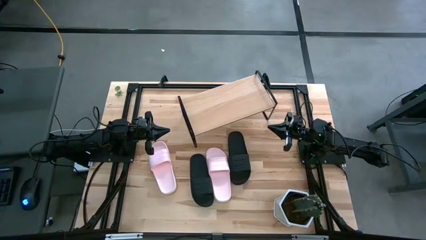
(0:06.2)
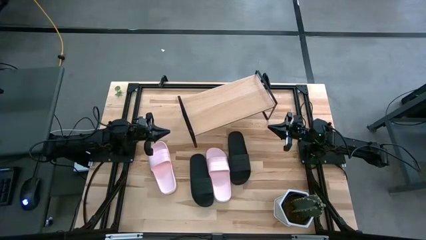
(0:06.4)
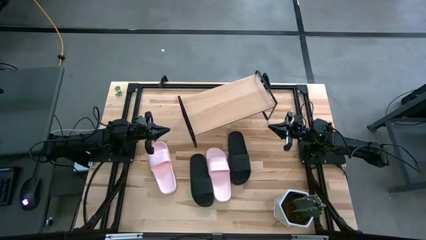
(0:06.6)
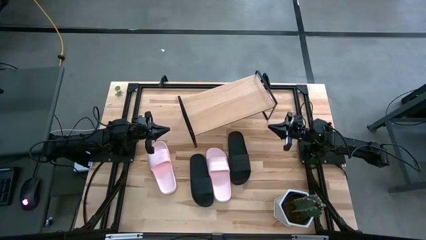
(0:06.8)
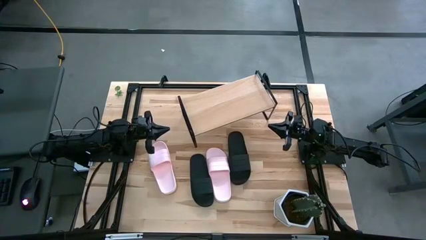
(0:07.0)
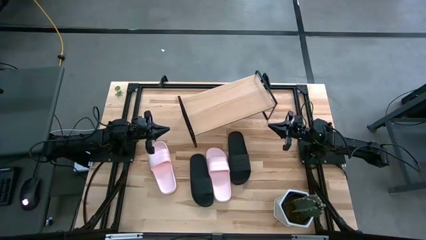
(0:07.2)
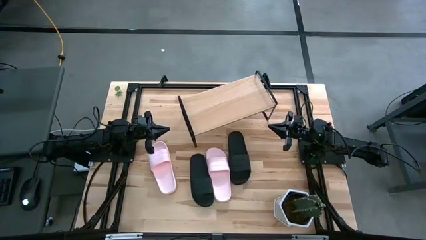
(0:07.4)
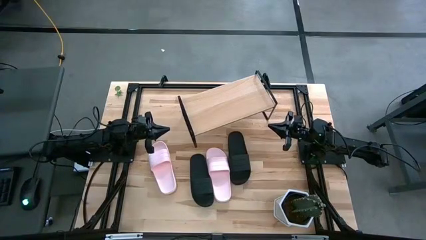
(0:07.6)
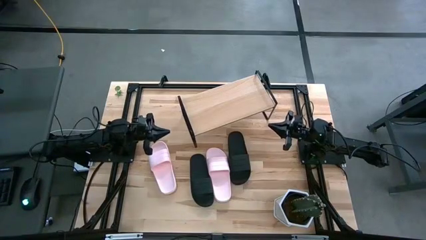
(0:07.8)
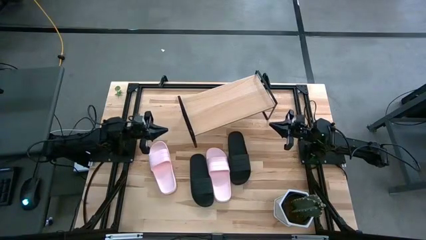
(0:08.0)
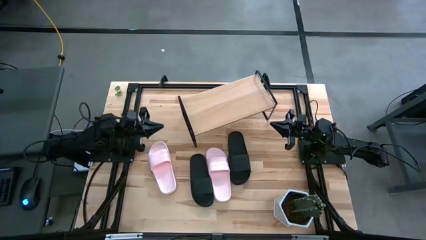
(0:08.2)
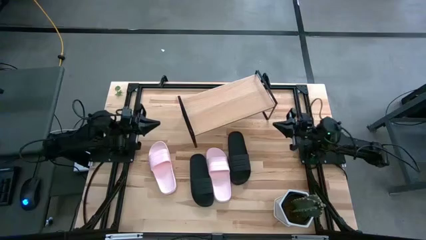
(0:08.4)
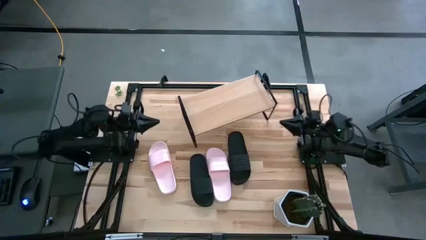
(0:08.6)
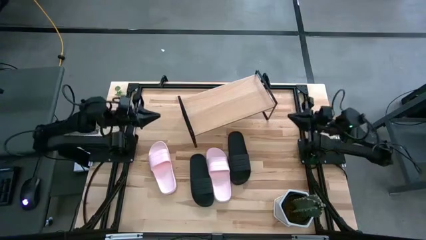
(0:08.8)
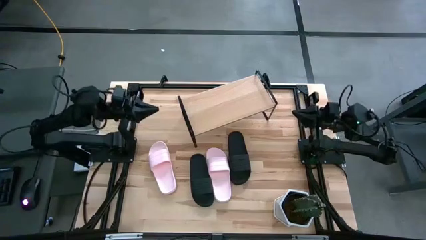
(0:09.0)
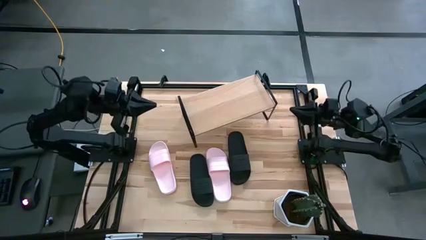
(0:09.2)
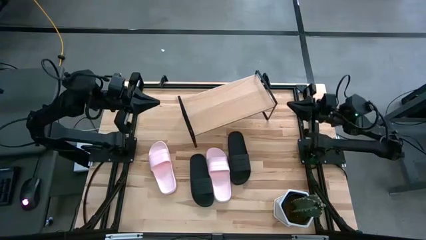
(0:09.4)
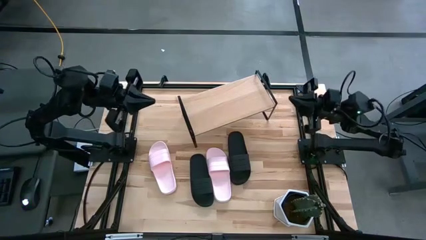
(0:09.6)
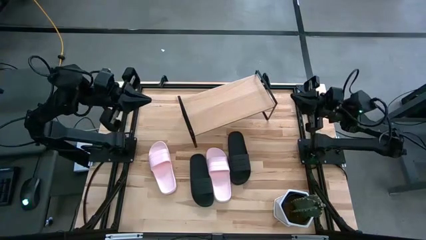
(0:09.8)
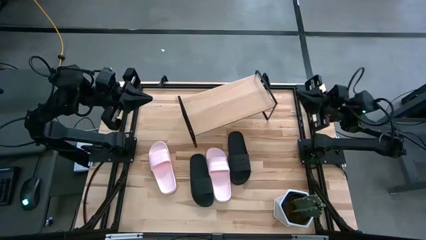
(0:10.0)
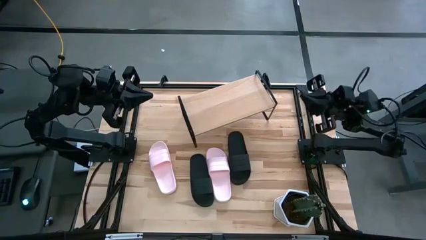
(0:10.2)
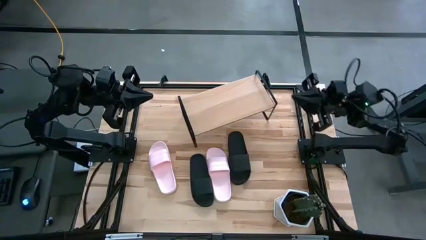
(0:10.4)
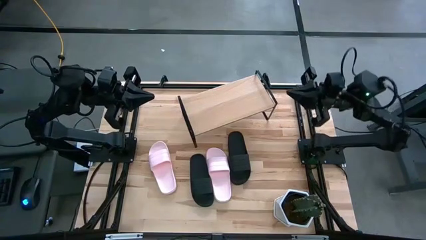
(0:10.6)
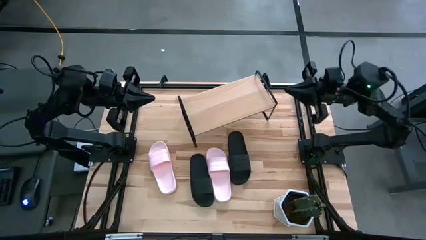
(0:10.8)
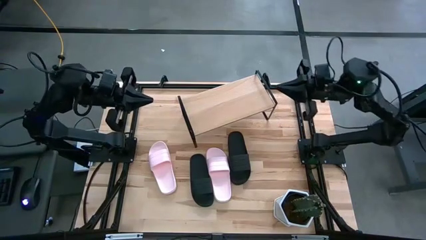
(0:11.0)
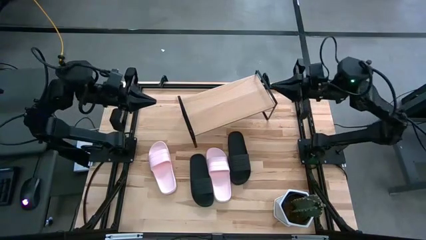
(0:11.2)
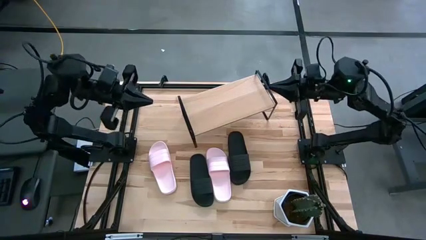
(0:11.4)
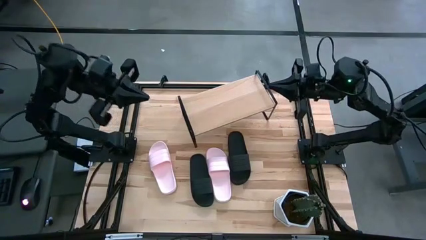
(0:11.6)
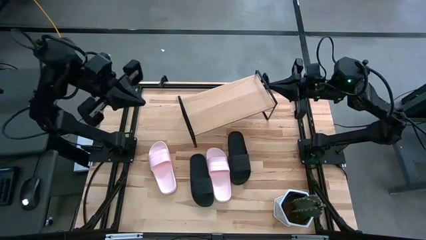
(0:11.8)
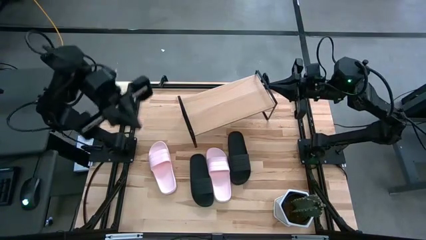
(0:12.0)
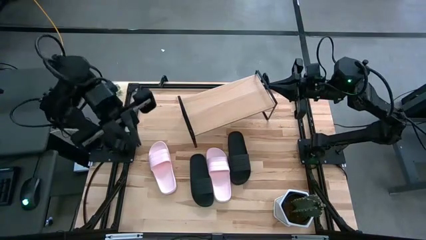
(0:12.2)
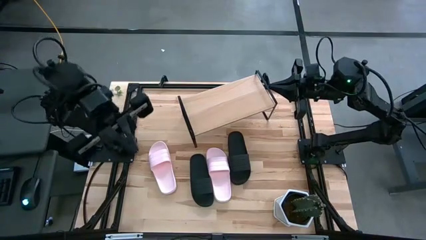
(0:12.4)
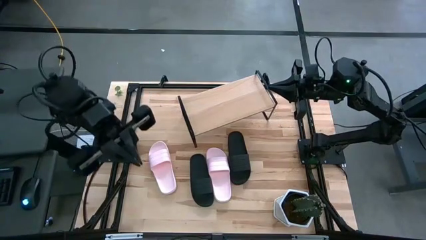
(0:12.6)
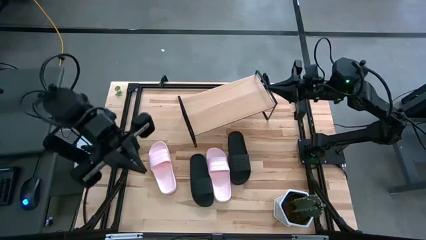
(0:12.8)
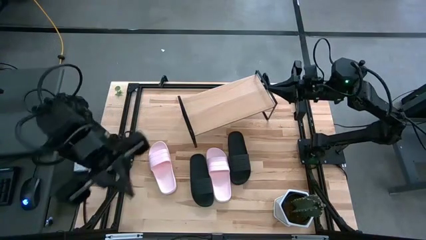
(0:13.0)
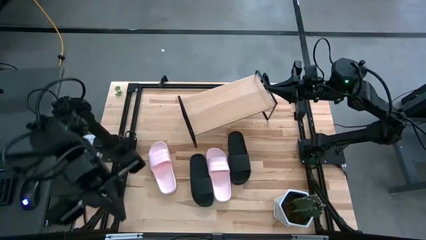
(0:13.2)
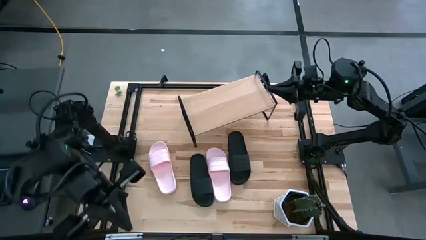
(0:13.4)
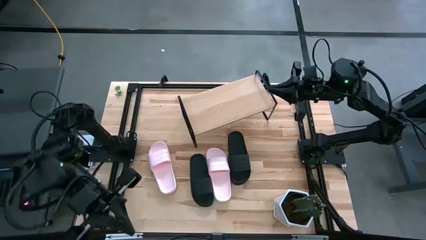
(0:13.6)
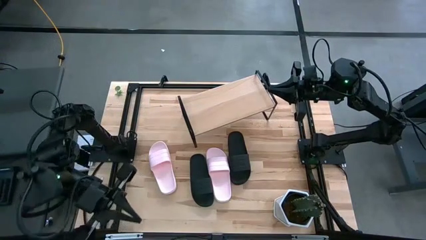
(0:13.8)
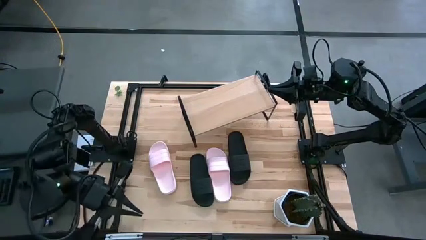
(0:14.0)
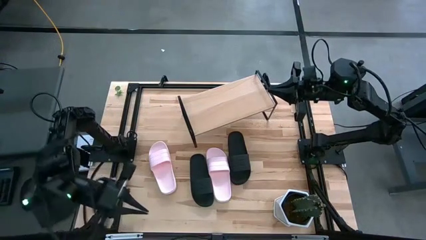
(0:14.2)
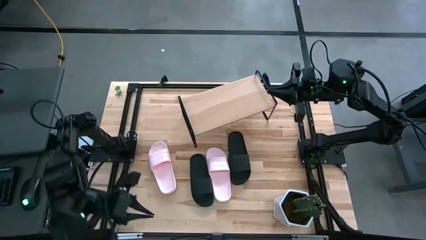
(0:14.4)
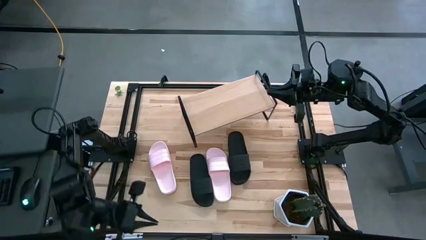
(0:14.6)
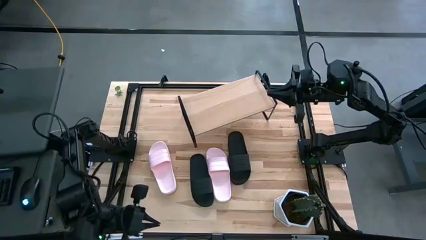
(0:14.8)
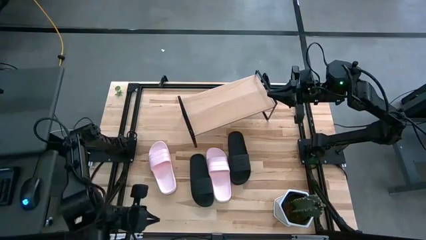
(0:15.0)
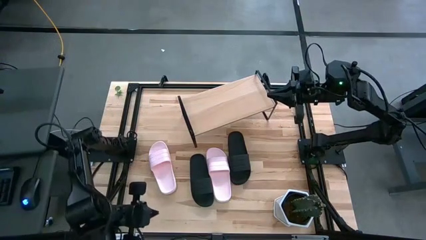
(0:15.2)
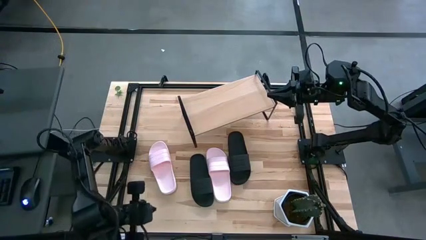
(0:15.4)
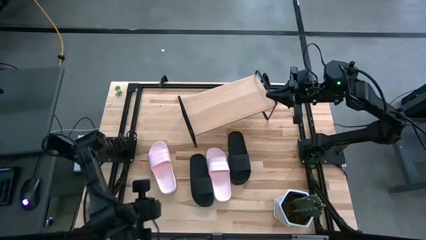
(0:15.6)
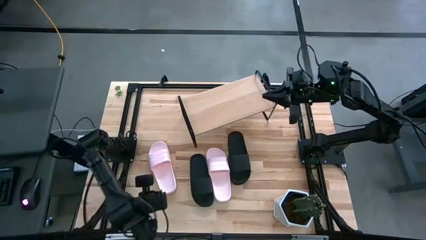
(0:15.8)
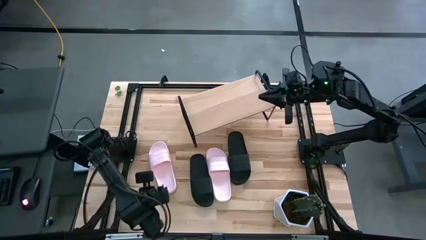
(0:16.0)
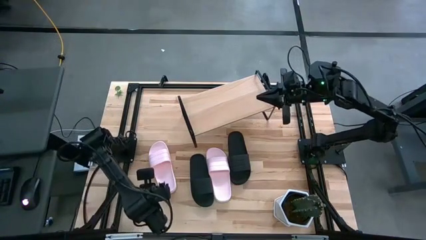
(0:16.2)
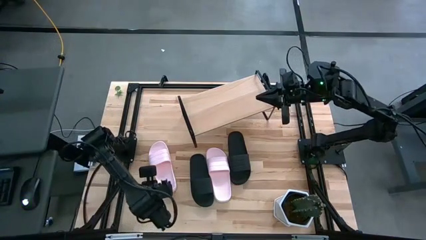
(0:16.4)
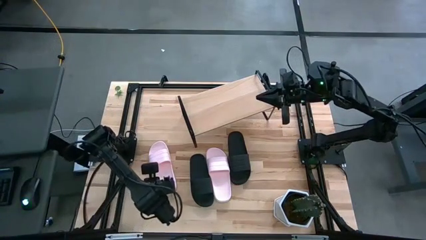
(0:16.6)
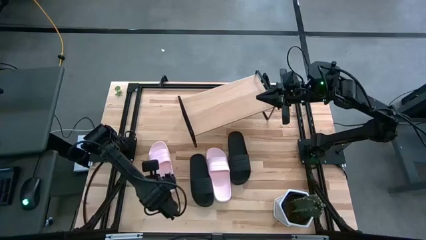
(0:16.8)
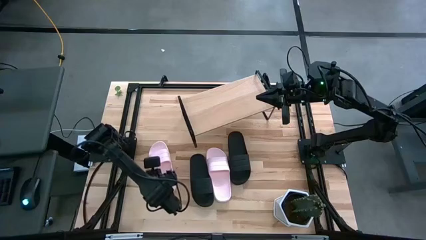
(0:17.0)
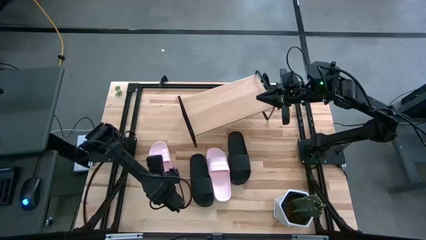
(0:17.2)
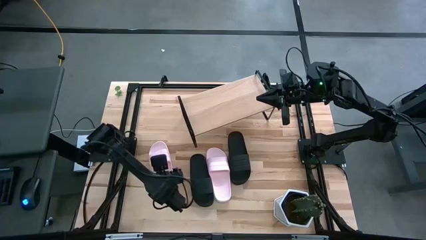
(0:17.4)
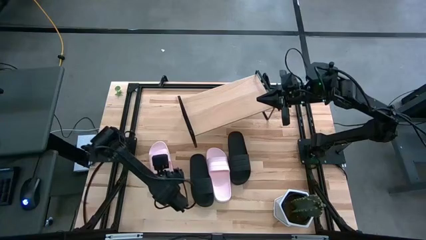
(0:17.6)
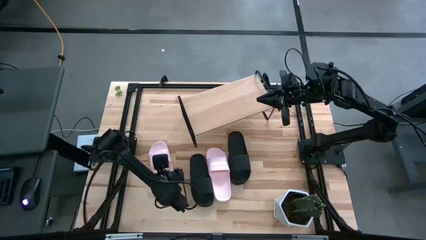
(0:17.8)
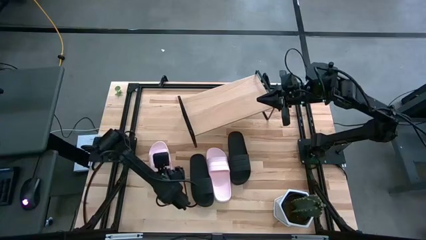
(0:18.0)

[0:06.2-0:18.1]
Task: Pick and place slides into the shelf
Put the left pink slide on the shelf
